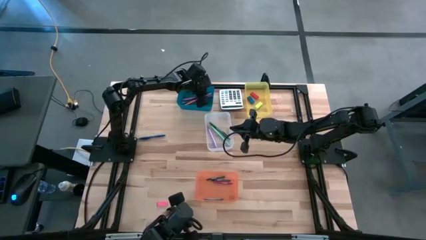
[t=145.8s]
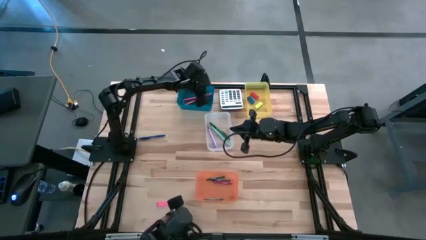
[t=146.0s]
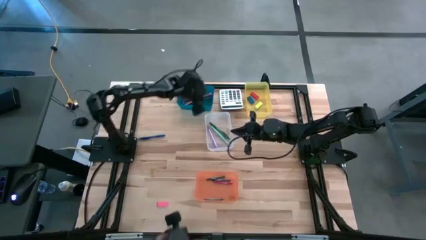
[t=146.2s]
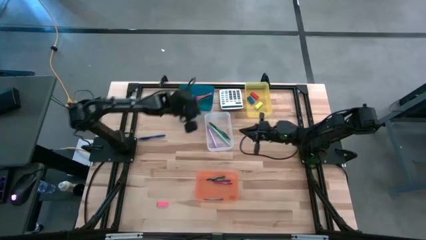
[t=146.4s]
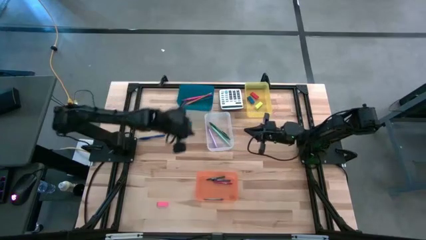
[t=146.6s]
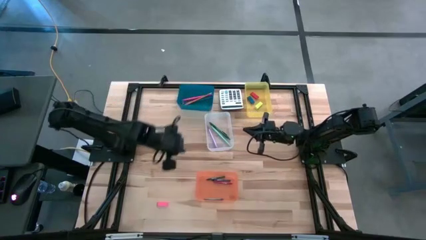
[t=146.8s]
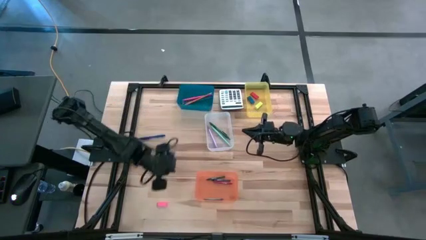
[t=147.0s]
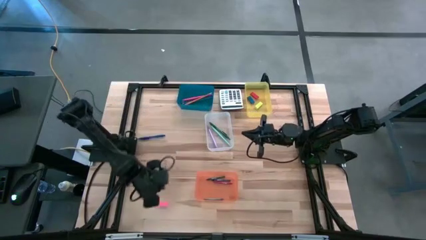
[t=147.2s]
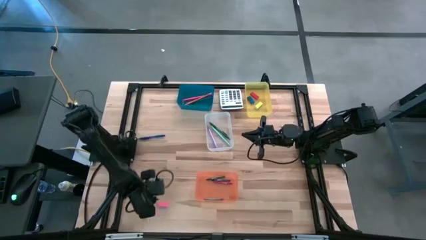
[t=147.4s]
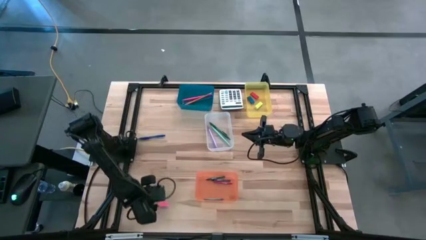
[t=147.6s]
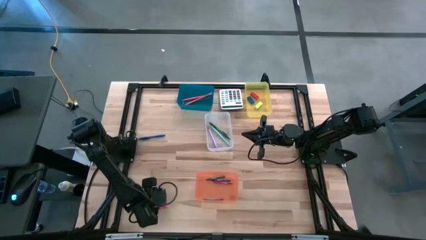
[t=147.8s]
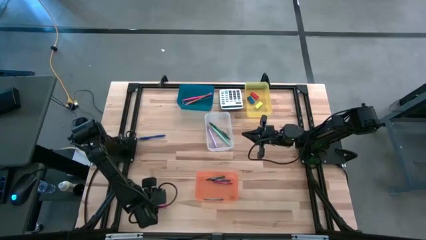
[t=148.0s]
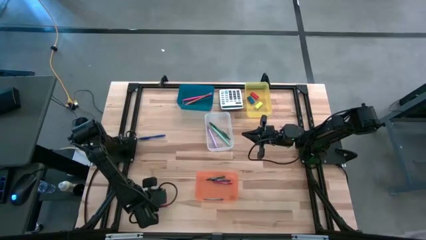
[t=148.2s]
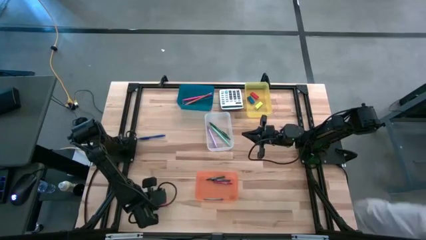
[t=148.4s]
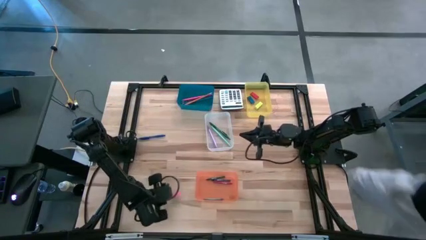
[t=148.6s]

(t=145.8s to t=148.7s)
Task: Sort crayons/erasers/pens/pencils in bins
Put the pink eraser into the yellow bin

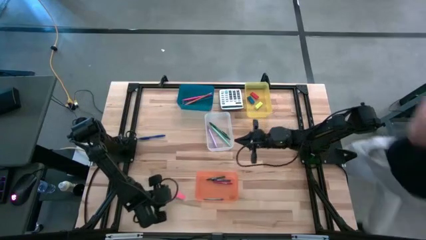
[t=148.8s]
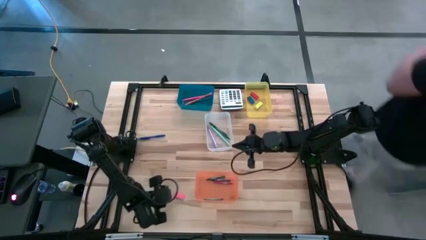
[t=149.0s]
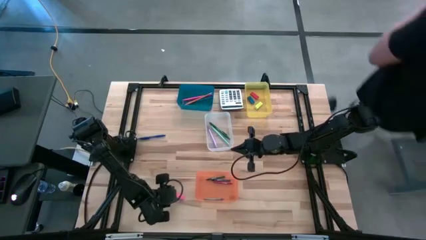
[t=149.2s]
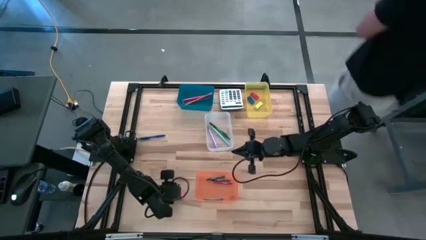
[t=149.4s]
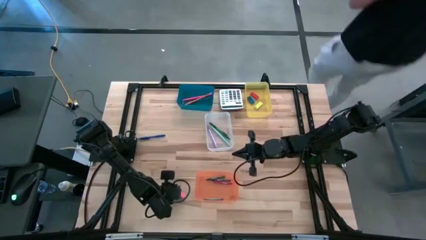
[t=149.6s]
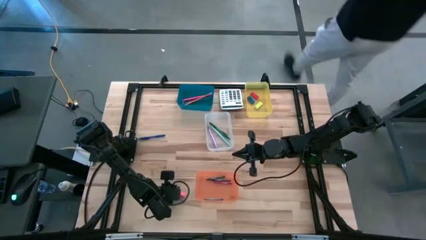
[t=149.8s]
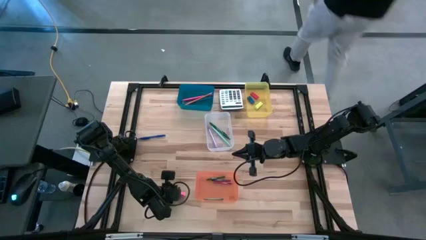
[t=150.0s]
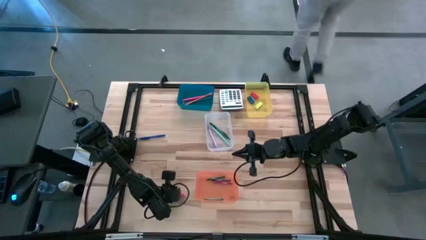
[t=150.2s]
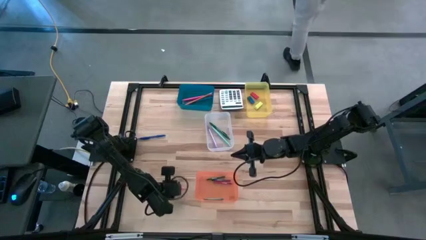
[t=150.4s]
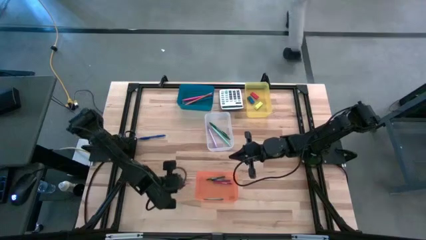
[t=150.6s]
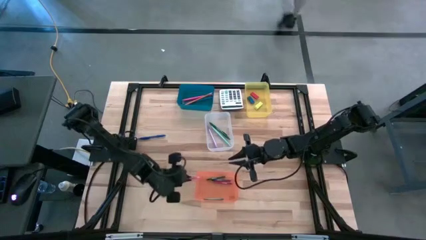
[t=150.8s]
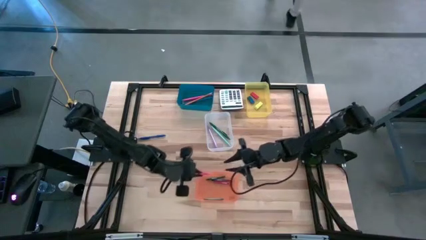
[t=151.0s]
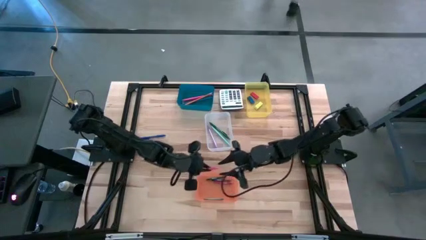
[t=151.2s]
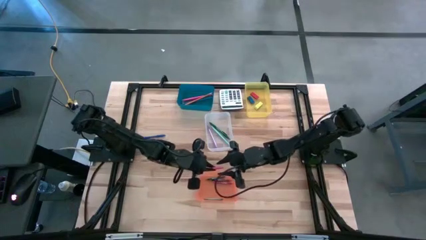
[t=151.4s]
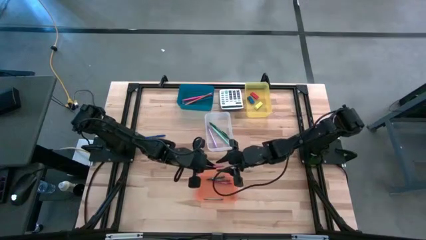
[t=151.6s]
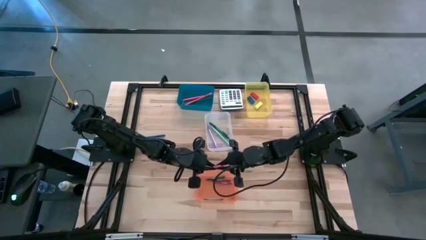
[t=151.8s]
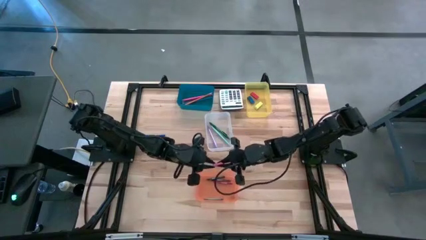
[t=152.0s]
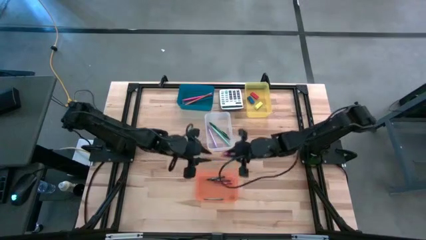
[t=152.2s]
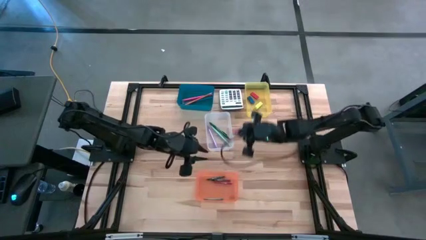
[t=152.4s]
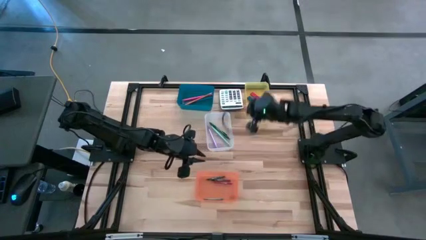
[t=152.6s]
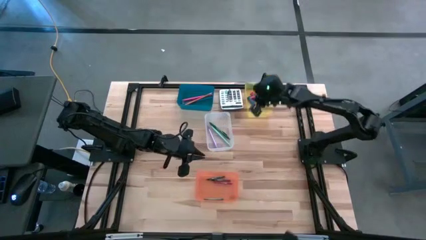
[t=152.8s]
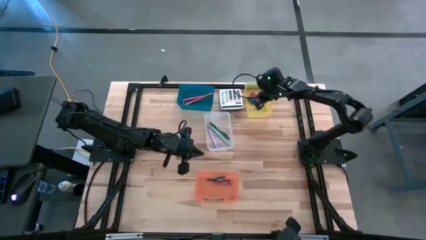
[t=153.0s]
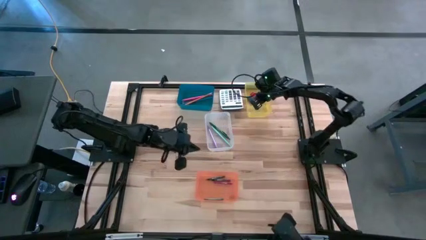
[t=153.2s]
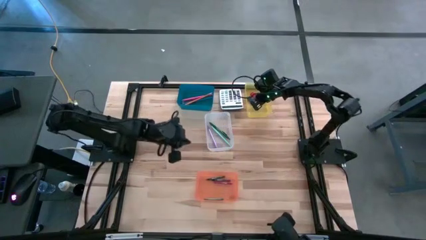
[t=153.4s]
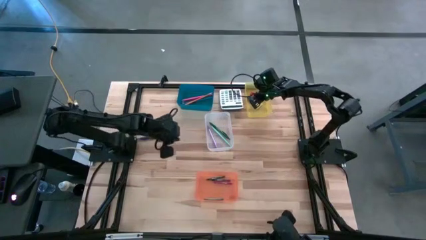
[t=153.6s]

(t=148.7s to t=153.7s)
Put the pink eraser into the yellow bin

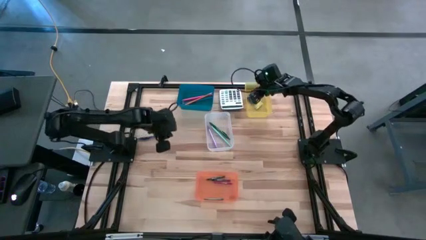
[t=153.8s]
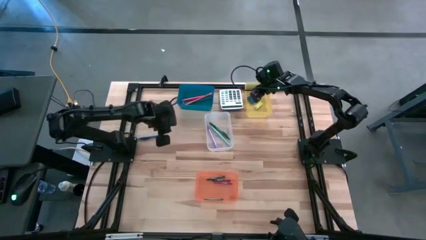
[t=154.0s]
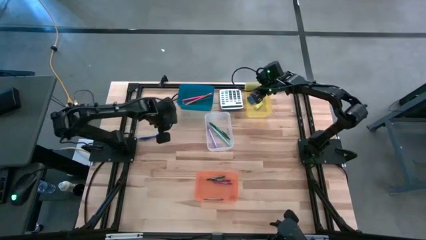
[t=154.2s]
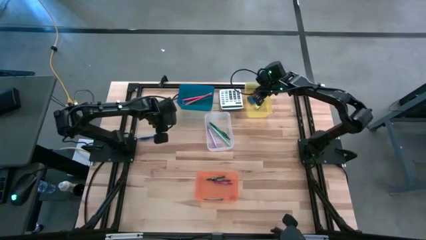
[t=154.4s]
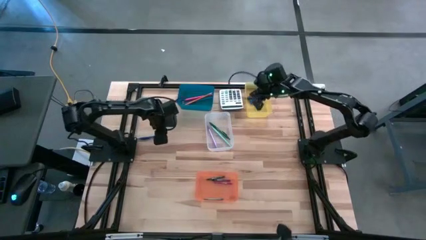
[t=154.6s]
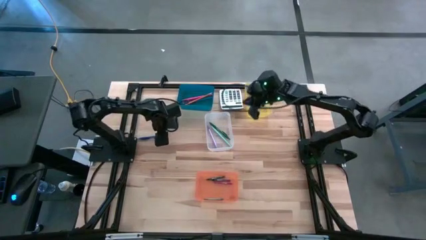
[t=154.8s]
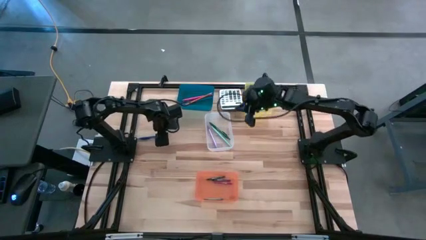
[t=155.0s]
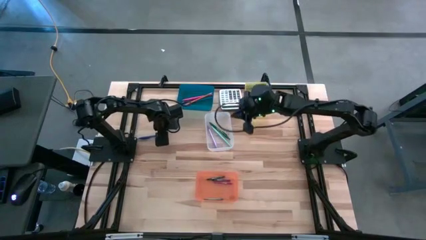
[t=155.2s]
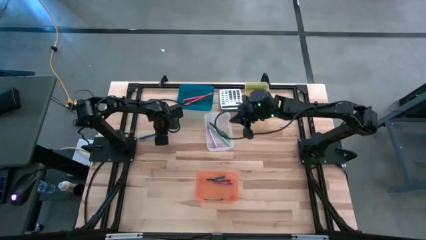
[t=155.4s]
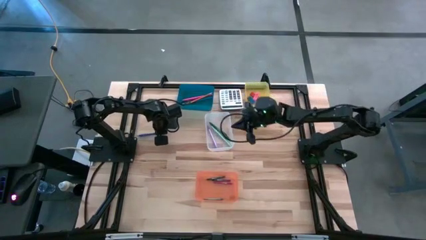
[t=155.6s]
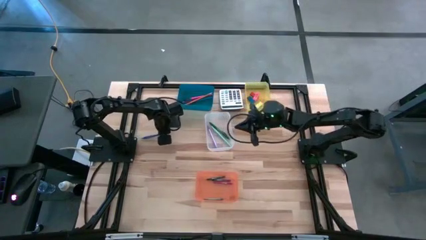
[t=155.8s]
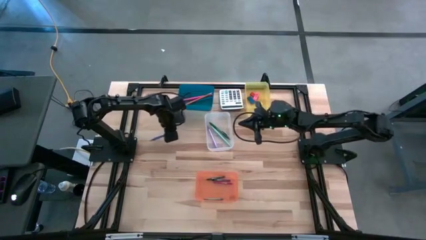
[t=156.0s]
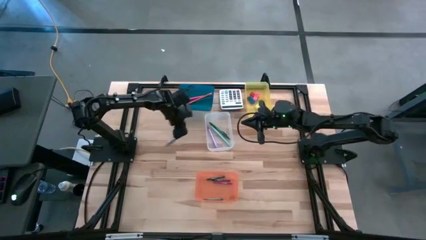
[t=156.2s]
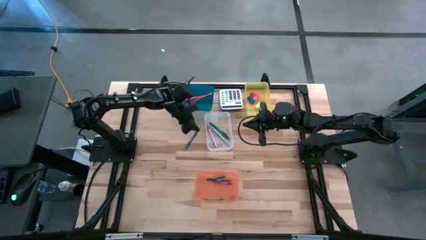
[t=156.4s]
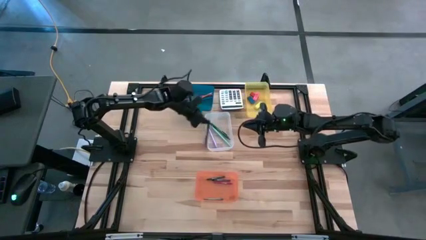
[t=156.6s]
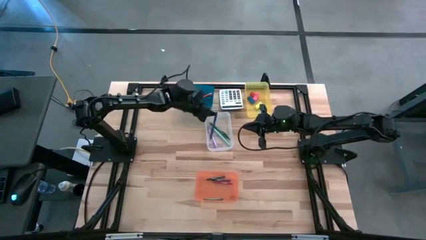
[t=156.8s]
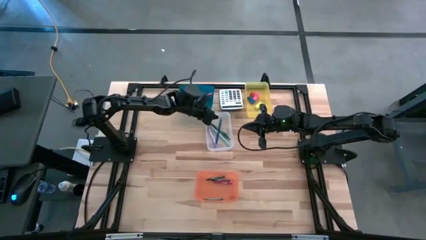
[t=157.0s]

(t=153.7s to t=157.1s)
Put the blue pen into the transparent bin

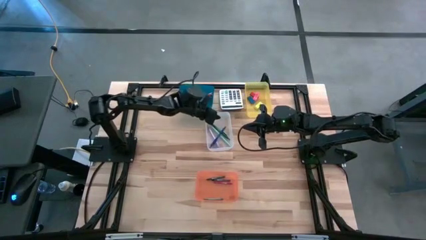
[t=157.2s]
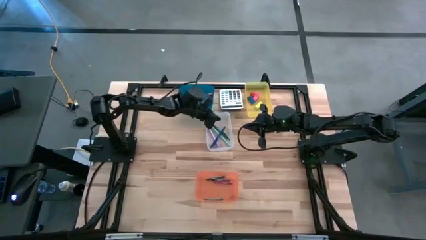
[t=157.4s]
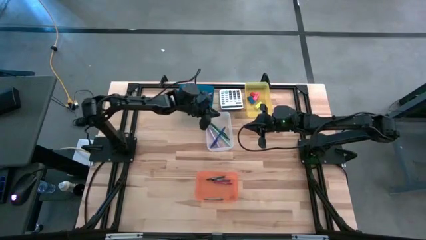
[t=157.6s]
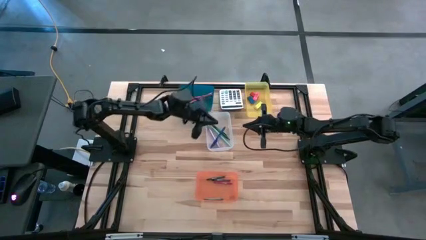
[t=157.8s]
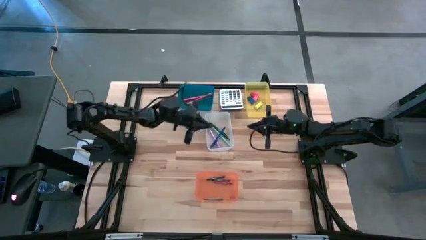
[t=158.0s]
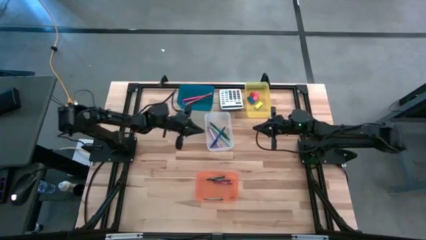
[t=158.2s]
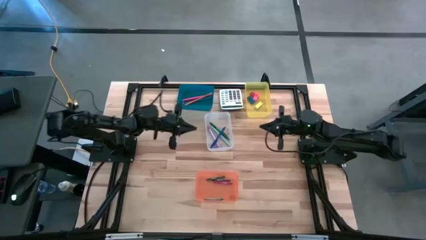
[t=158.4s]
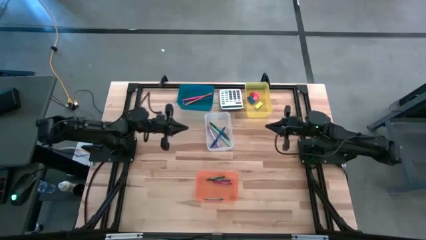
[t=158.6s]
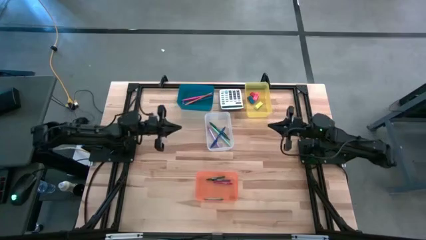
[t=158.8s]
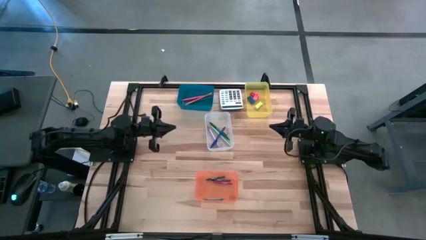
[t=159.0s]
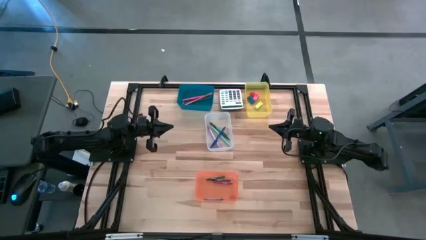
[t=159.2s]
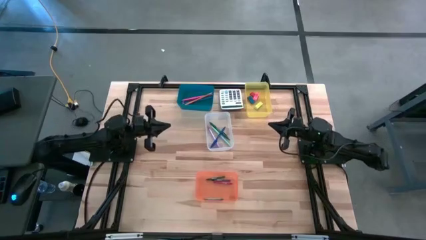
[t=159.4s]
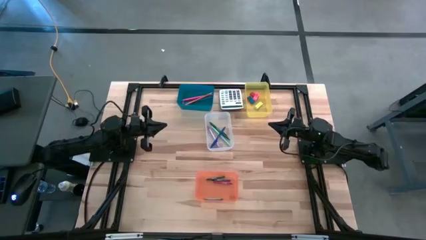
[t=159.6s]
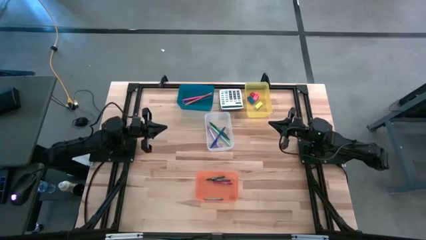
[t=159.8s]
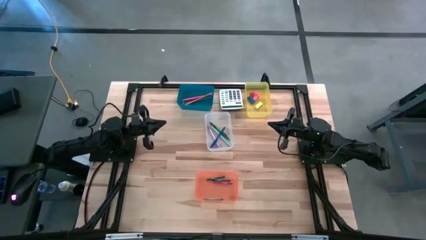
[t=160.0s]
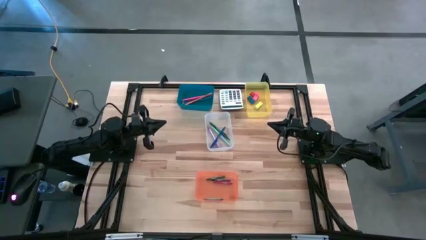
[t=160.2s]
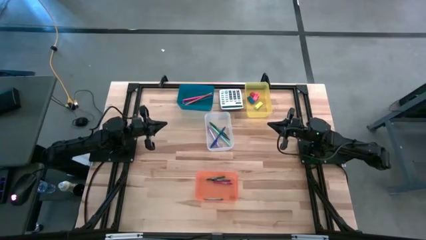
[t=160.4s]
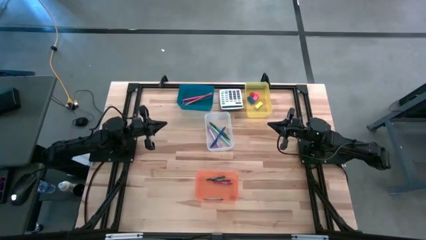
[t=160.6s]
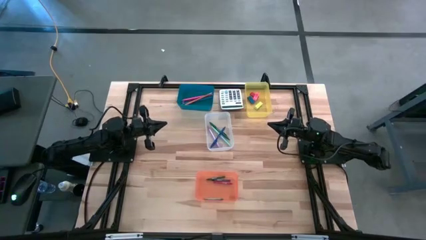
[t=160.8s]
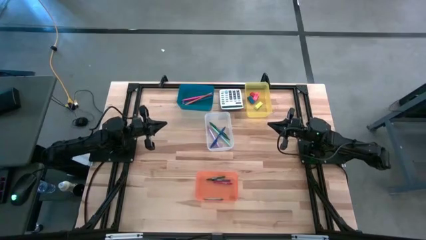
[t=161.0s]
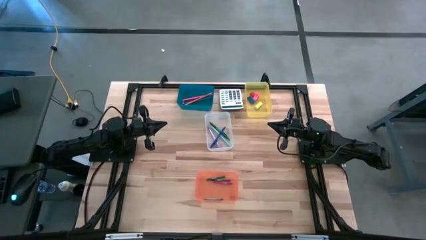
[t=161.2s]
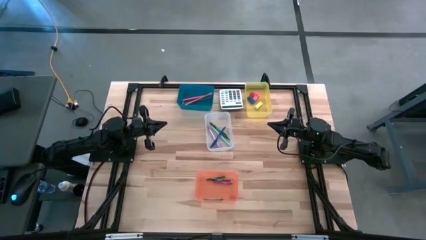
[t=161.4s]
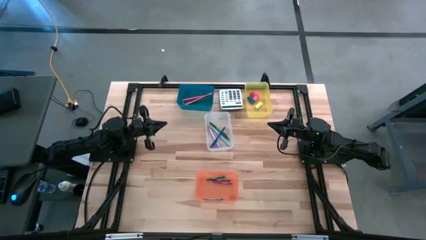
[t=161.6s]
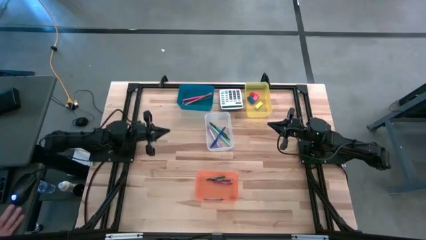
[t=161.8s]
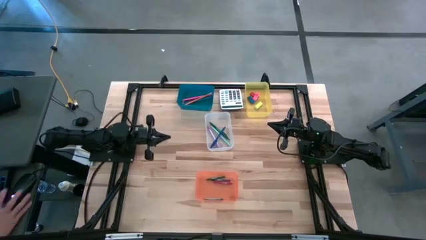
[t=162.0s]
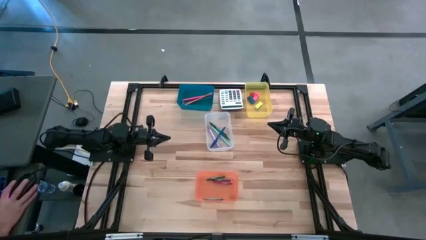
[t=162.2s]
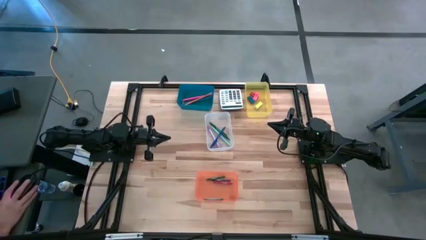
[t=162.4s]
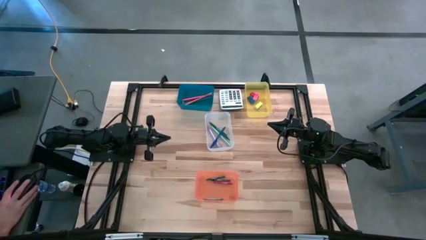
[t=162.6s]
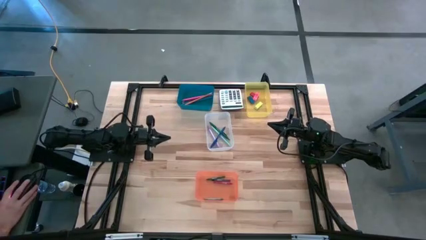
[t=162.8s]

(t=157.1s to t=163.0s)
Return to Home Position
